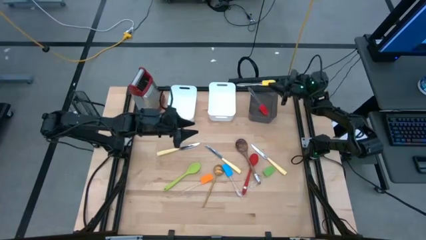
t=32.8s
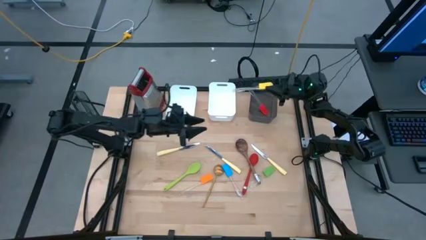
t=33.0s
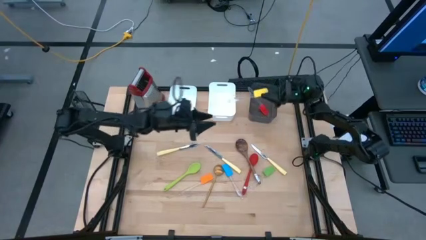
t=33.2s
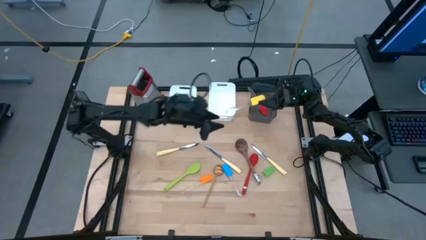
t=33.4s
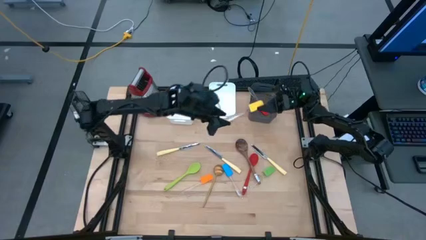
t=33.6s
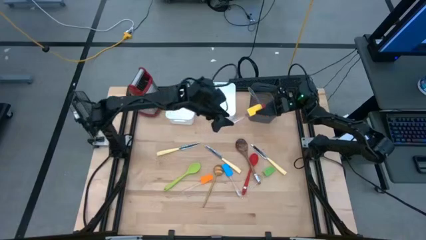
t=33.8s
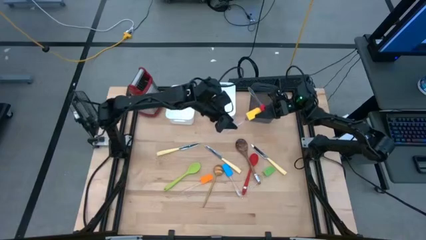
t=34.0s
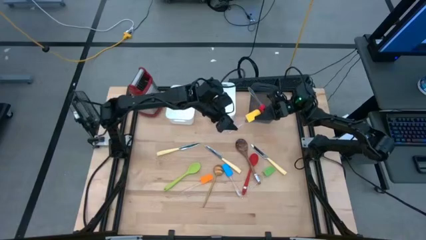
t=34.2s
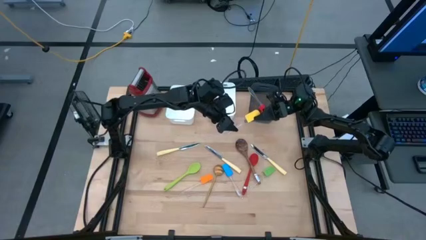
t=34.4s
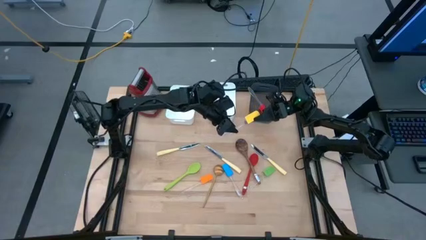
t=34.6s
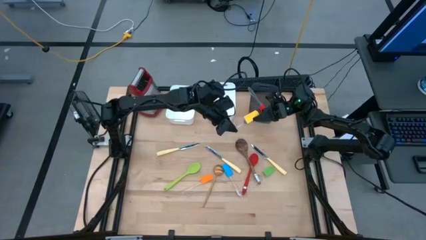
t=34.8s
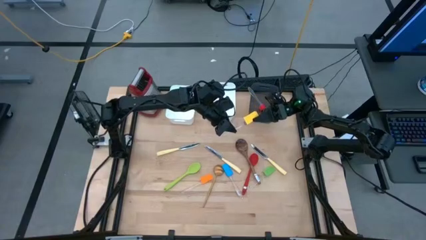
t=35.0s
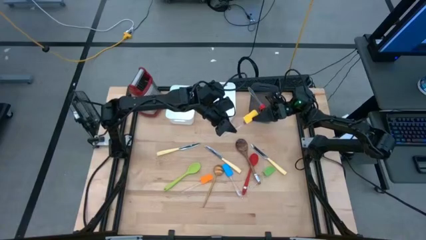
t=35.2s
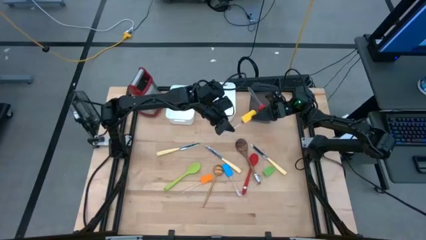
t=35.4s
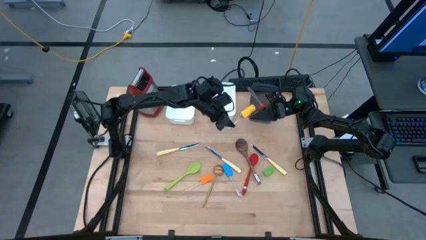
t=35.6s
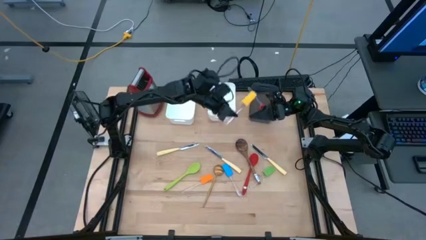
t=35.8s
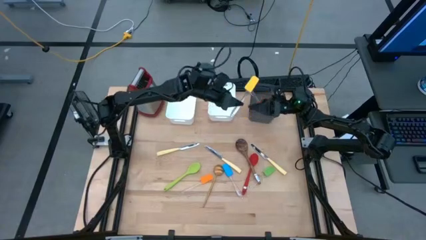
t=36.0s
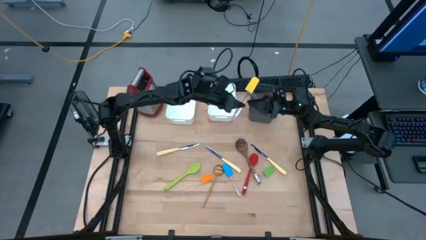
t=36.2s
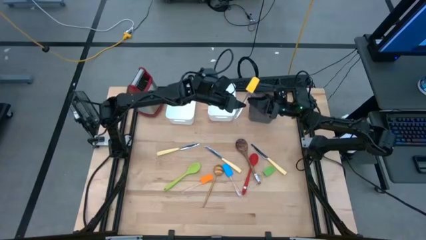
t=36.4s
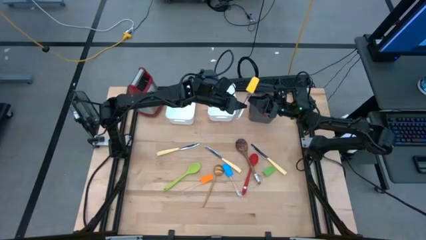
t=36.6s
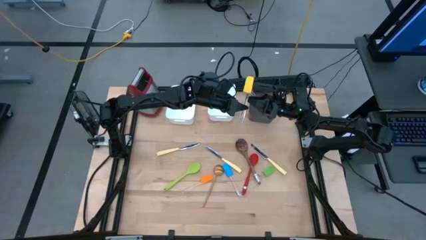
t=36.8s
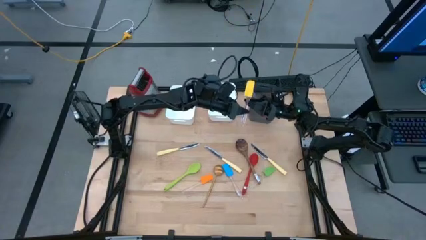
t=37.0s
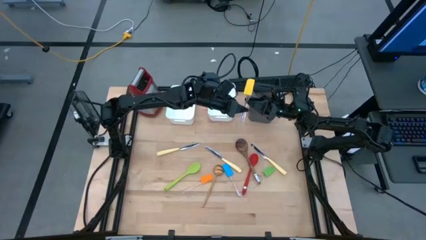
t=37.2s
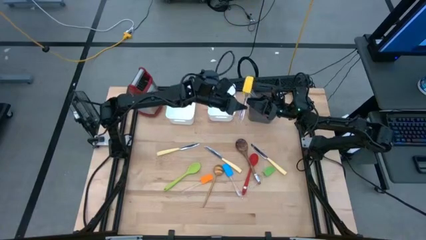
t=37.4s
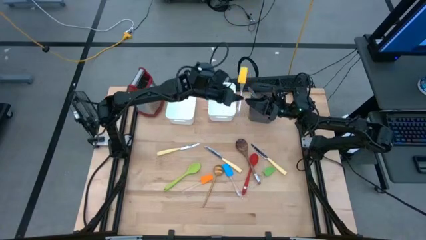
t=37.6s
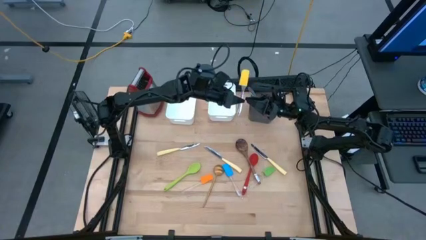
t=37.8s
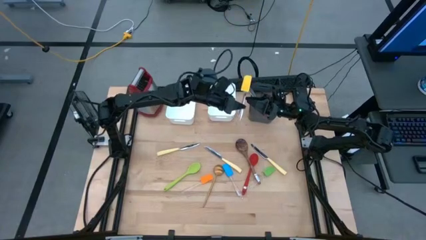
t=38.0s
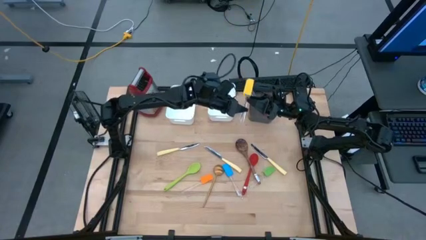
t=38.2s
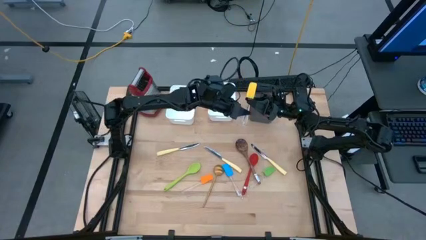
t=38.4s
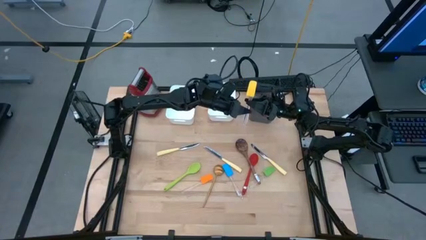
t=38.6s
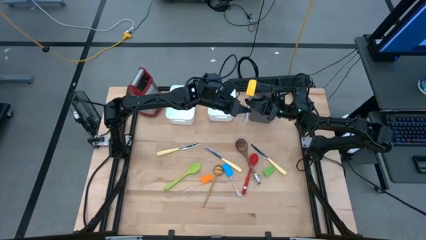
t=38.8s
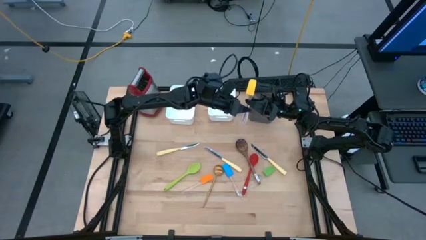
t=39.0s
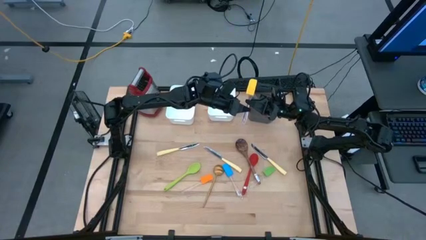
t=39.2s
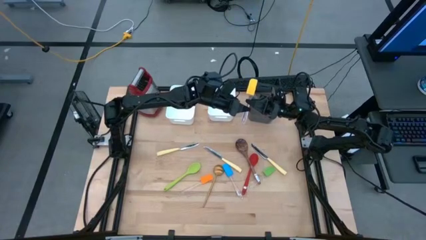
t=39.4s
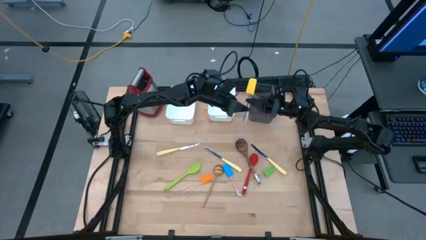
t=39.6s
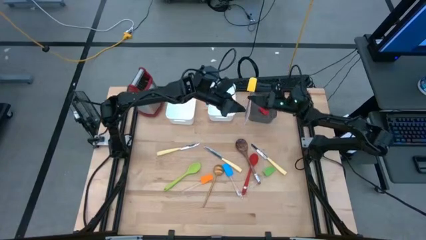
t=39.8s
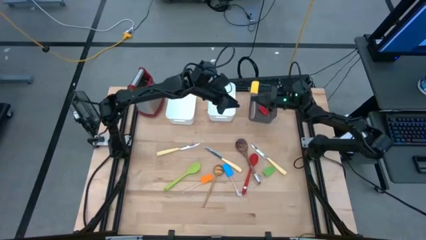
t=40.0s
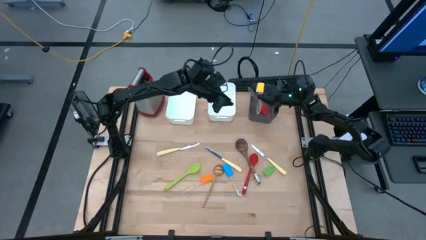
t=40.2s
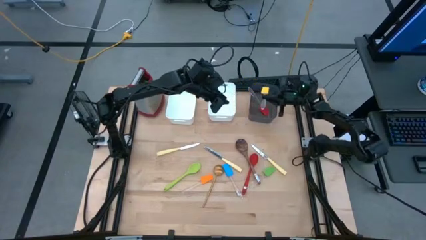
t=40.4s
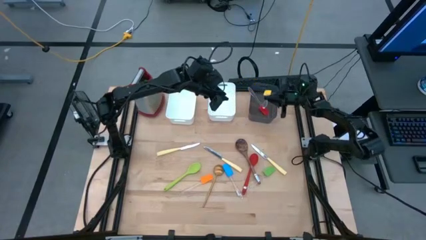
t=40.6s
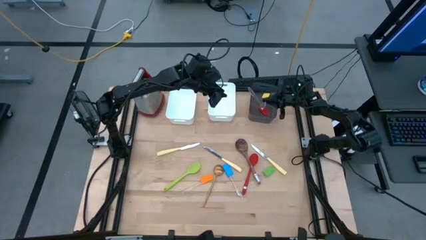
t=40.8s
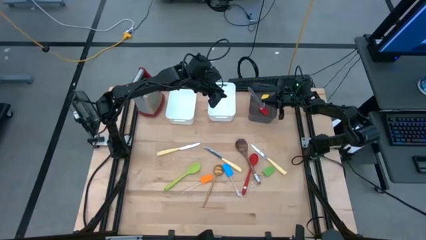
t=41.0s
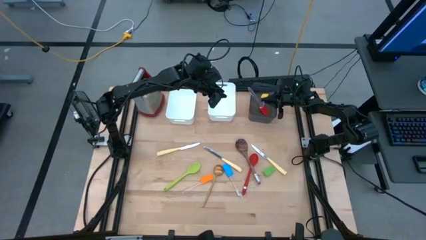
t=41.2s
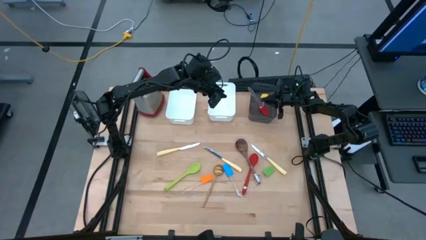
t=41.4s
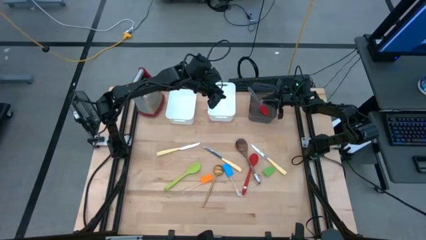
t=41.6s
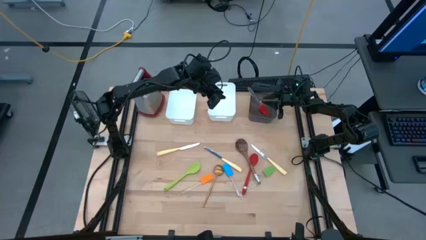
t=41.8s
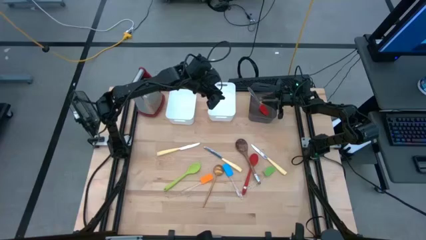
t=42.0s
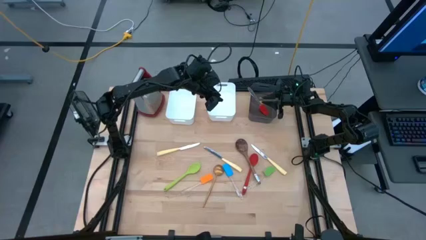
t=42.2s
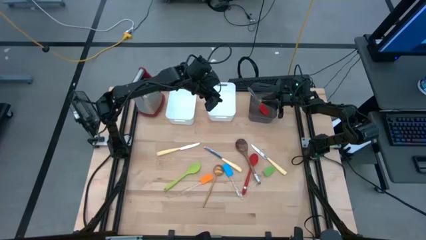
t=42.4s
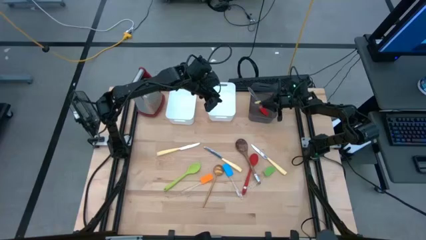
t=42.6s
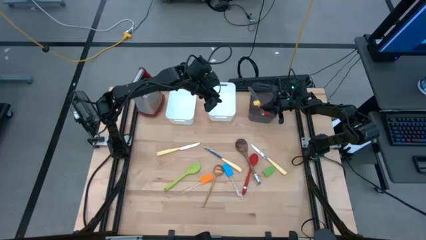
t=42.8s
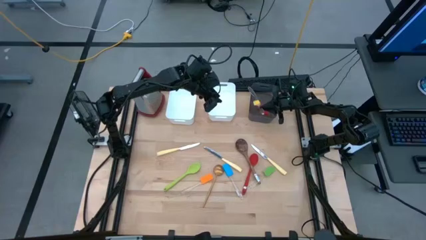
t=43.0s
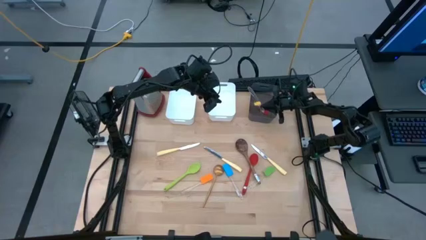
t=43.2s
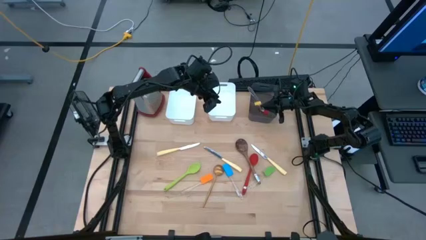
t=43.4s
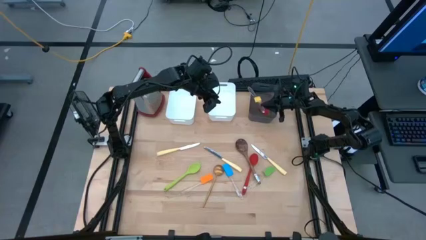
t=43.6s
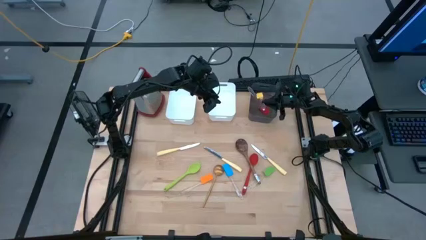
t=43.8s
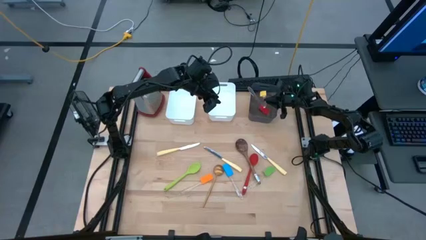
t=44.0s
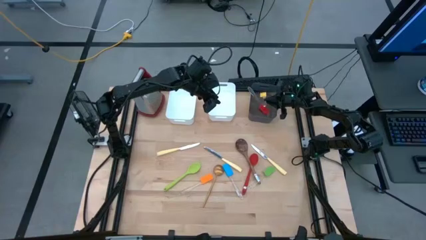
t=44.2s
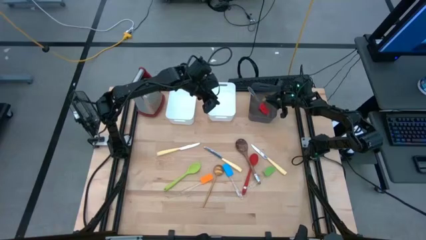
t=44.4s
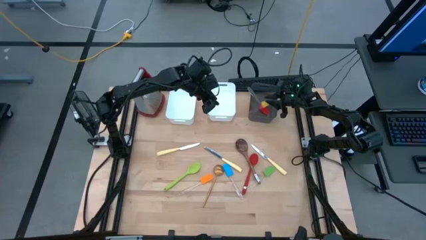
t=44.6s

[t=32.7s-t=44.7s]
Task: Pick & Place Kitchen Items
Put the yellow spatula into the black bin
